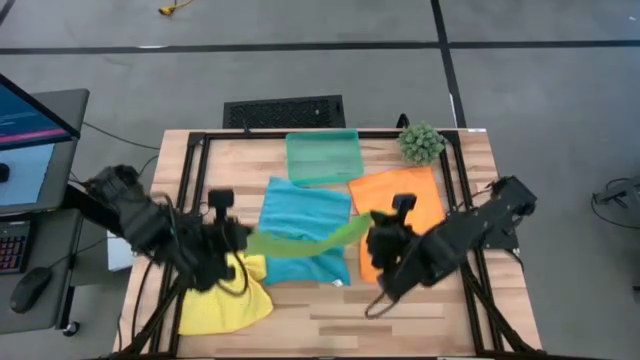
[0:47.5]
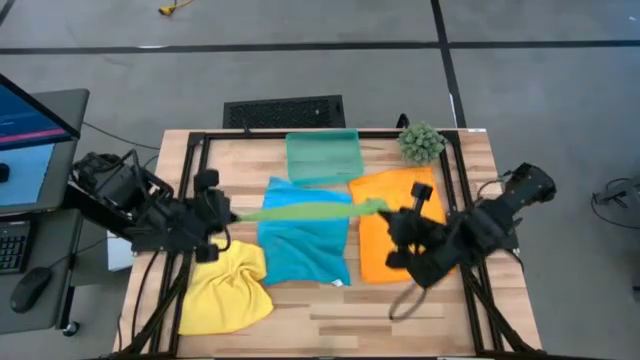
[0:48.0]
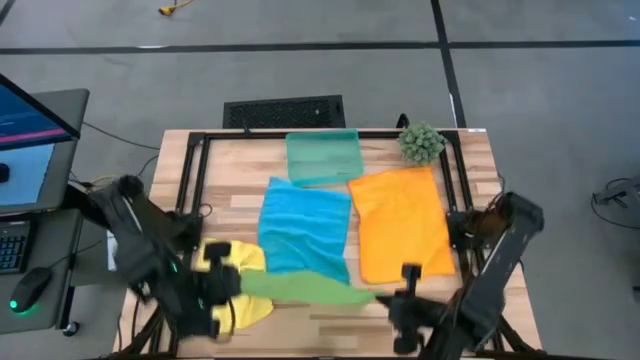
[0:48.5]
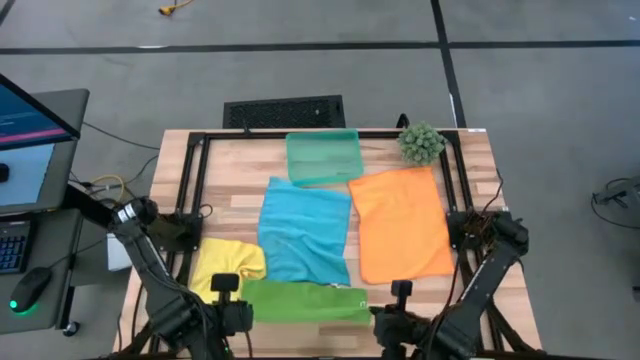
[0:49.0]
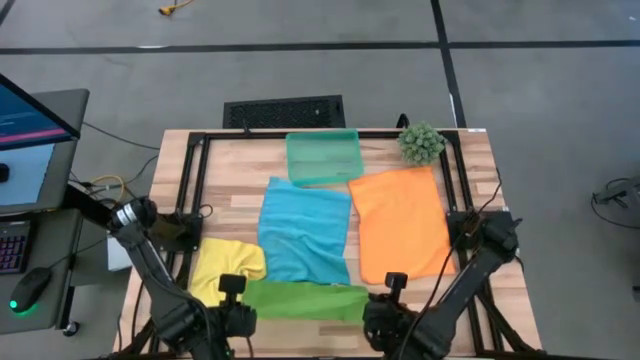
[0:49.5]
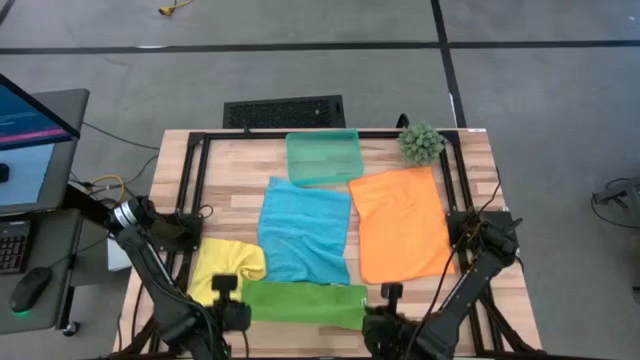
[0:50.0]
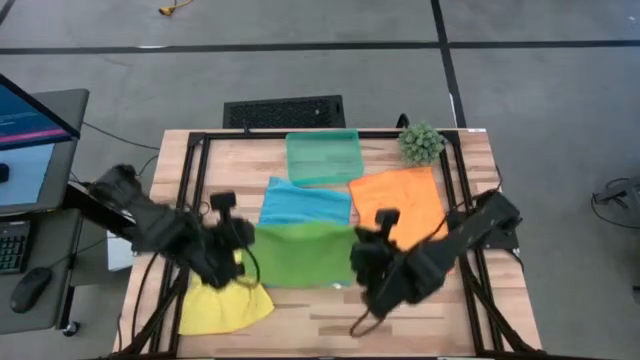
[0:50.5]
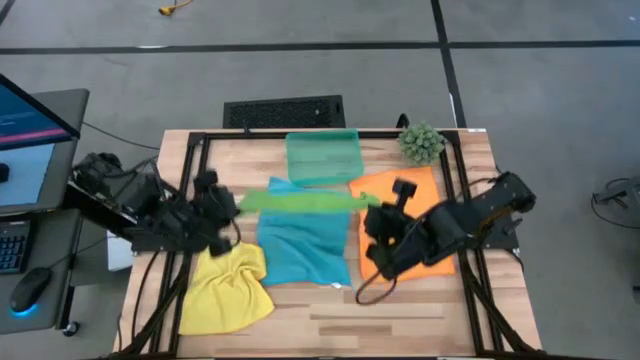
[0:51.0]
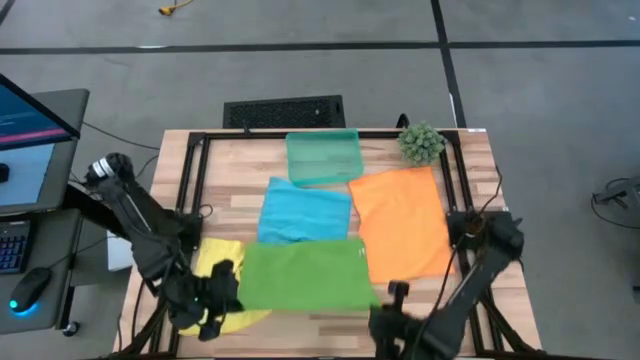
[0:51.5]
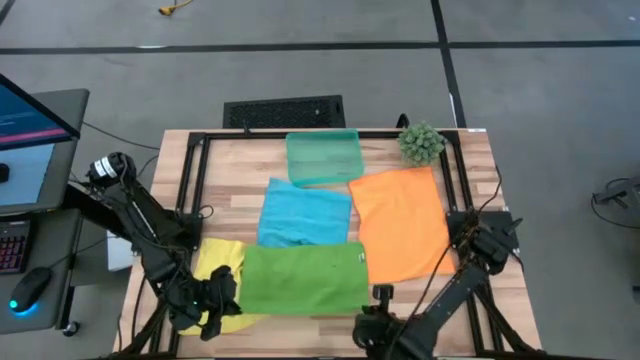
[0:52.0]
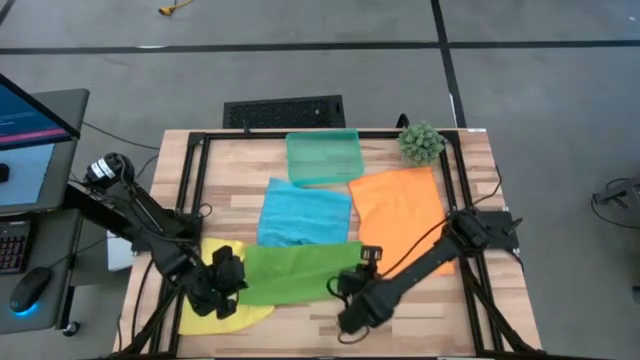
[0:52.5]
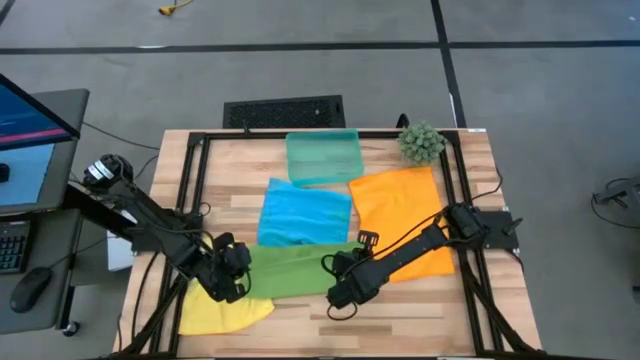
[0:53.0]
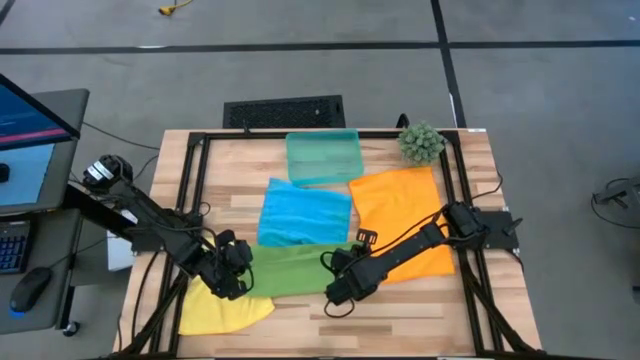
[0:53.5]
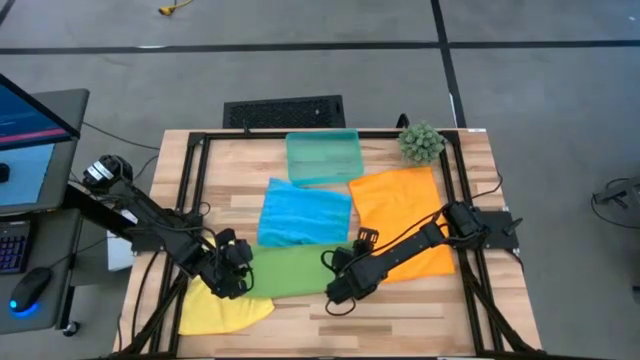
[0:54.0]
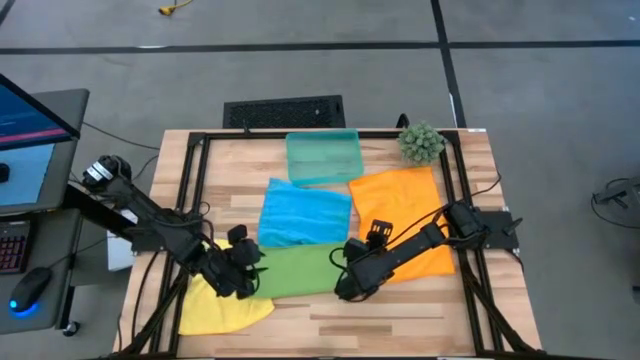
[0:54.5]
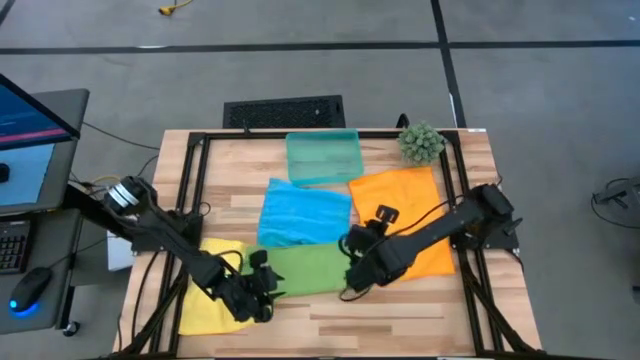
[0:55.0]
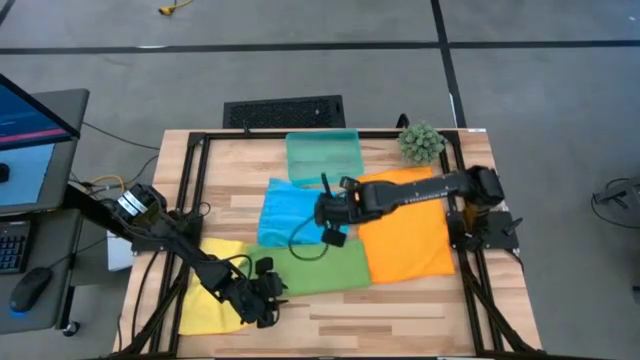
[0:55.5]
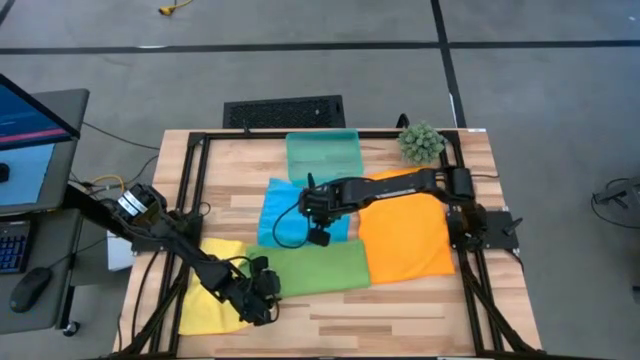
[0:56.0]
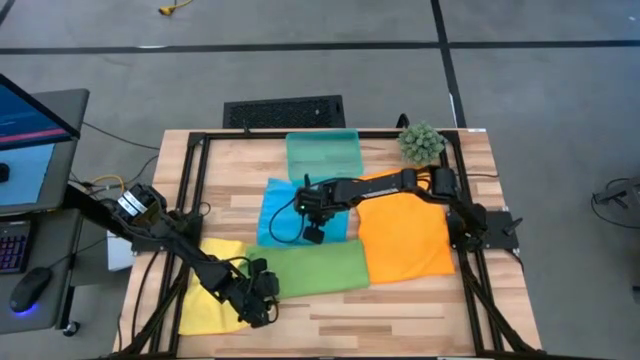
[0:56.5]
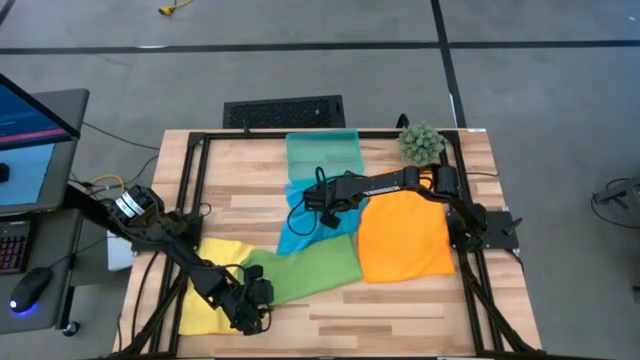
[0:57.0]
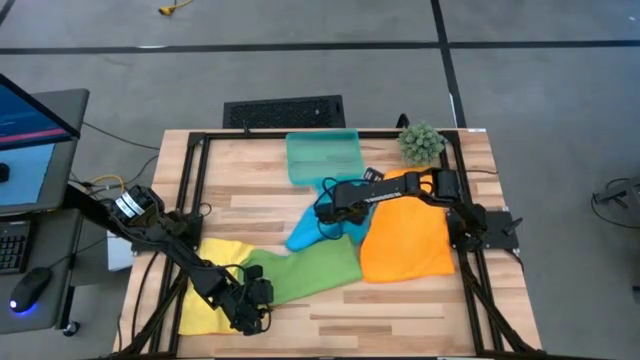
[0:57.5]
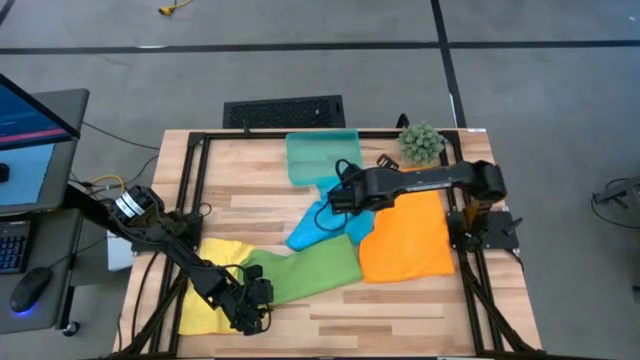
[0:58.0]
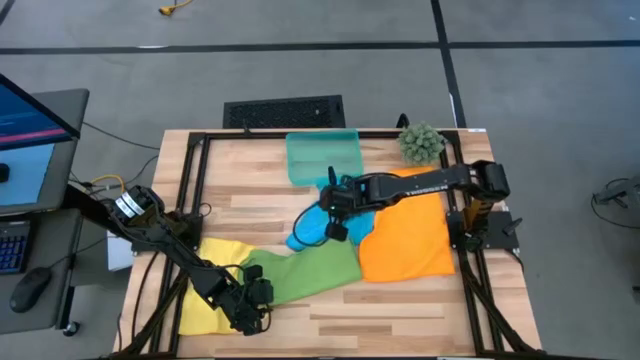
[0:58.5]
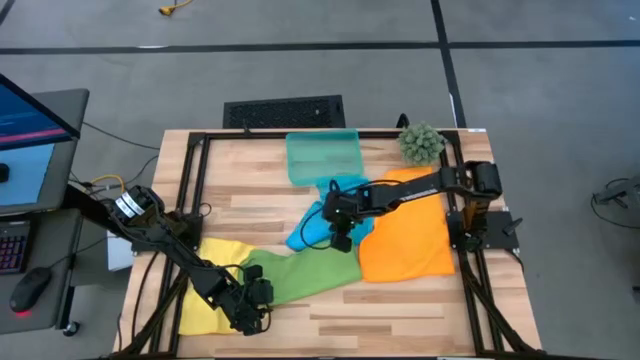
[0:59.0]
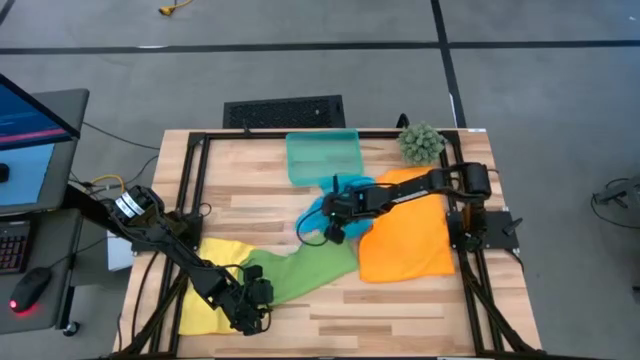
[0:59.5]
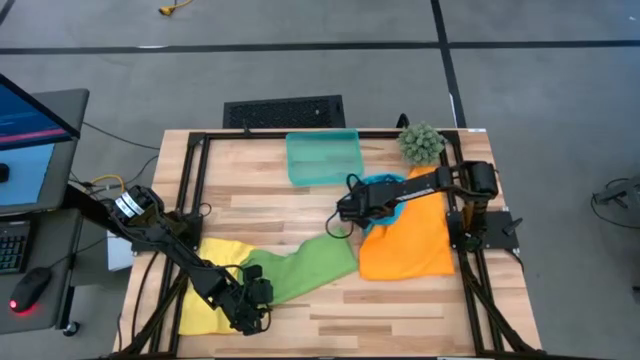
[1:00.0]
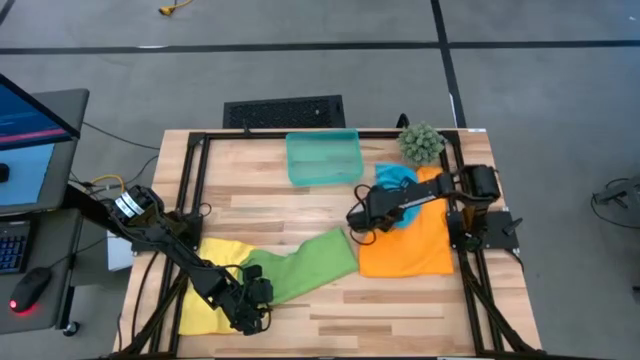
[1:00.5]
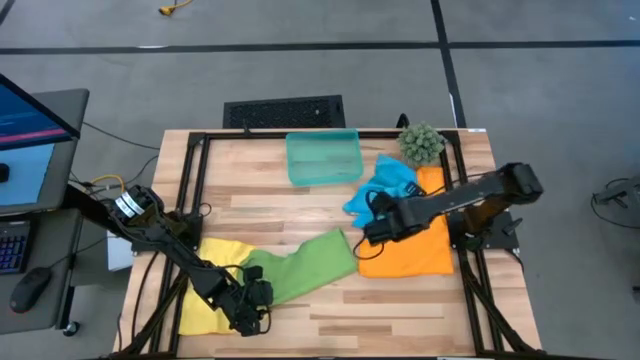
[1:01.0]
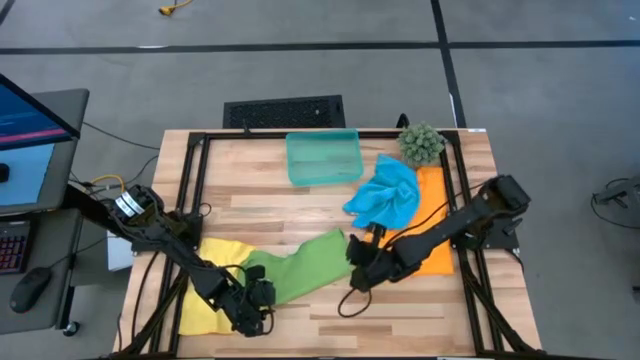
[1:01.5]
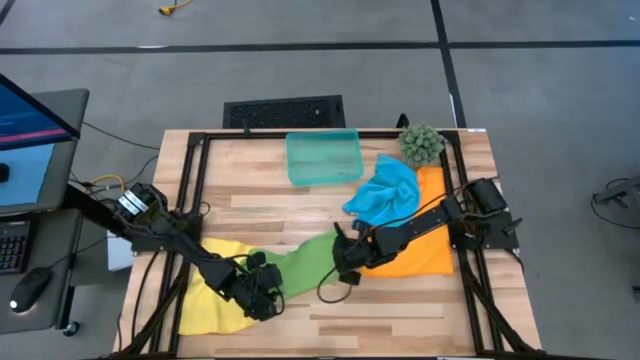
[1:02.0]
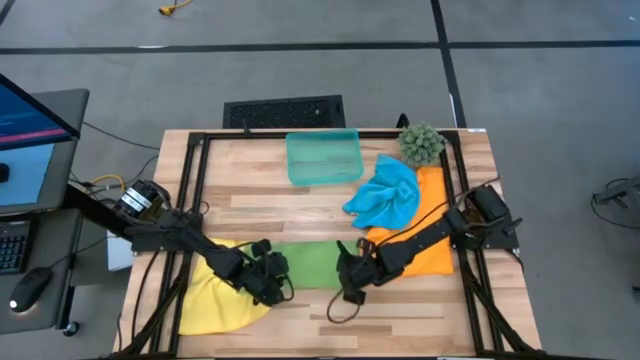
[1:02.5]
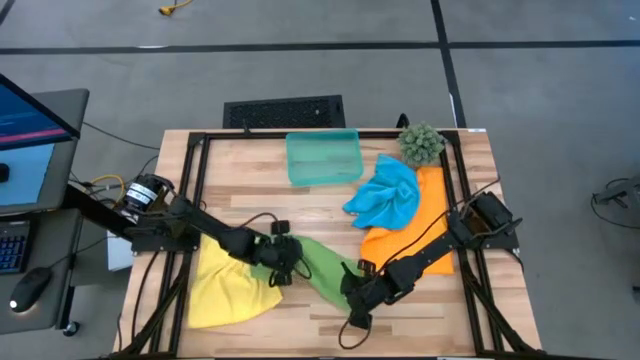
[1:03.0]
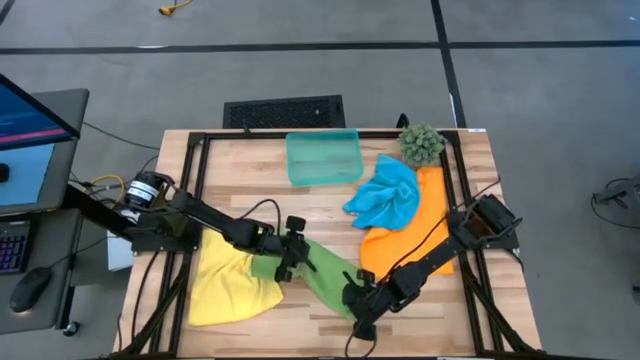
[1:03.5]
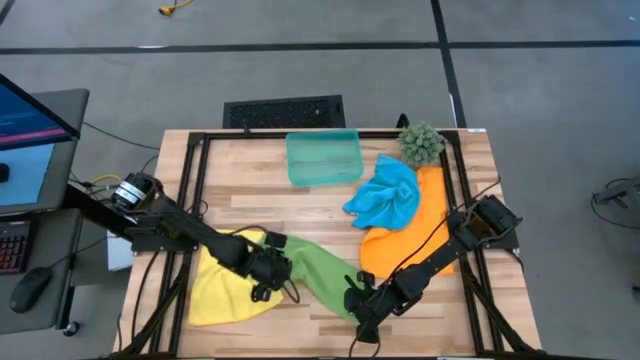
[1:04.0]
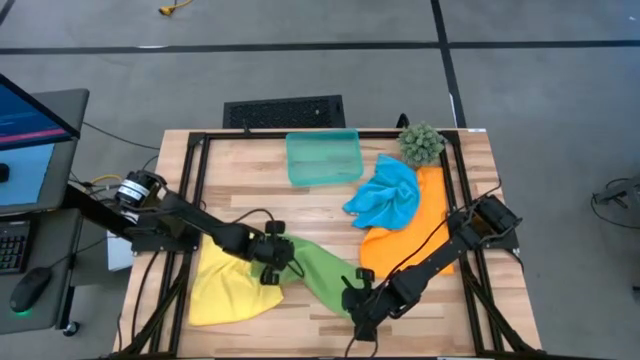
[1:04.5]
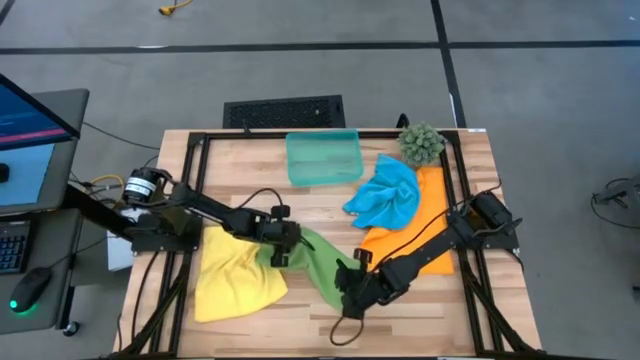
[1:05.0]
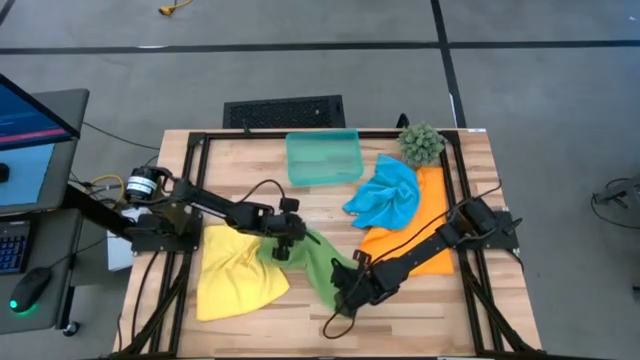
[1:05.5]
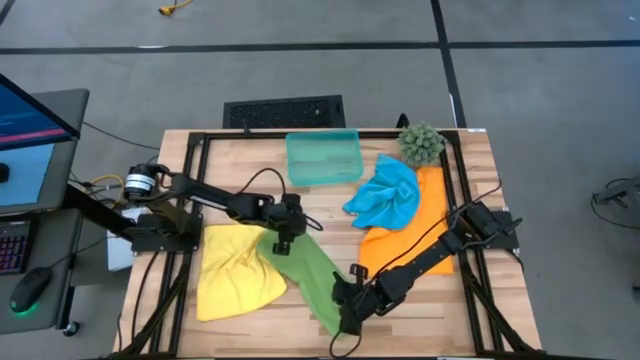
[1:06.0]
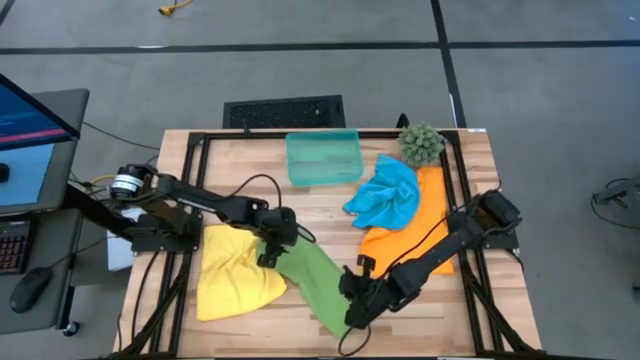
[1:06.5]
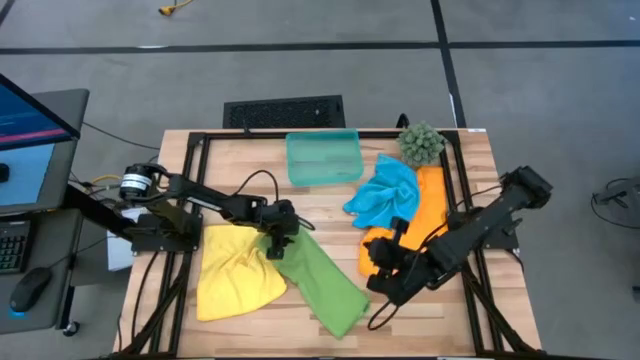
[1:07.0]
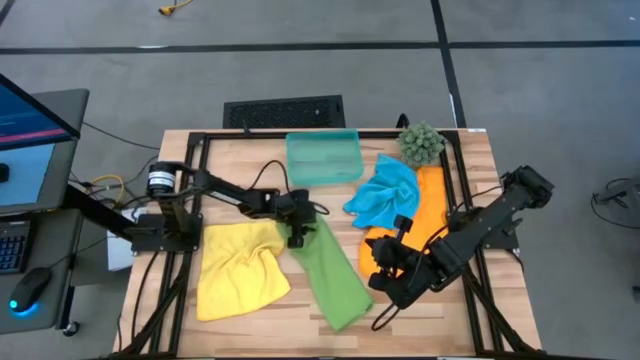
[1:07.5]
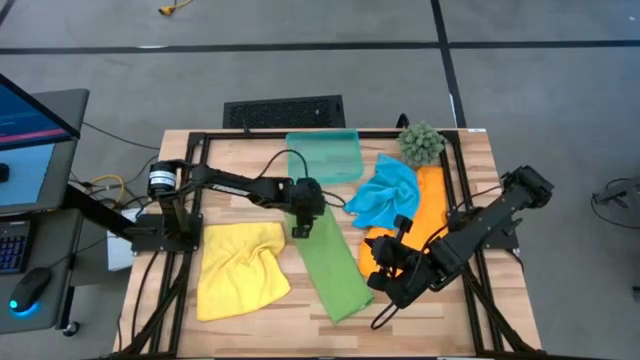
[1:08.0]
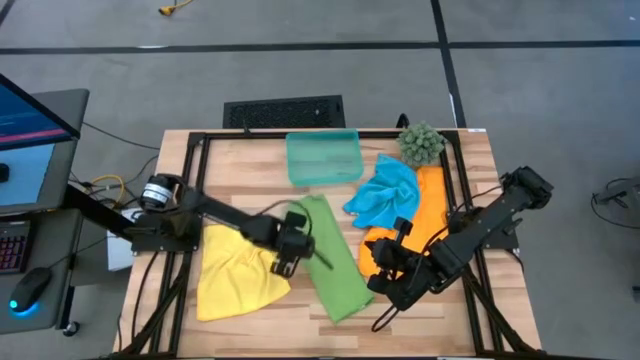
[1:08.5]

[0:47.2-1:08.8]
Task: Roll microfiber towels into tight, uniform cylinder then place into a basket
Roll the green microfiber cloth
